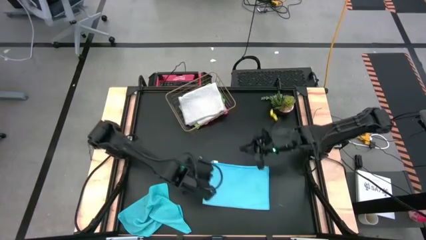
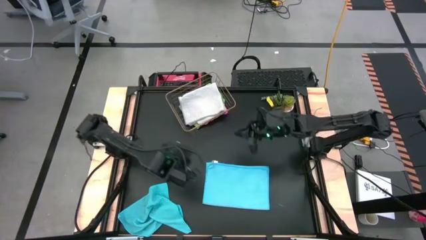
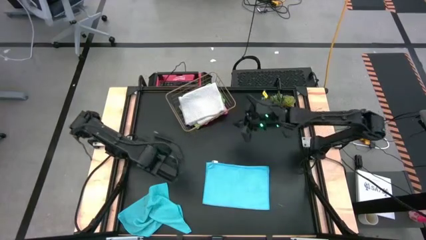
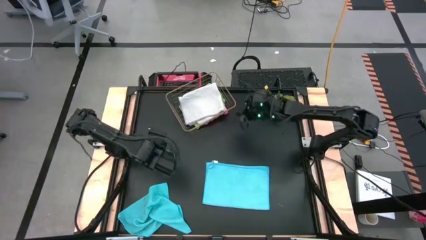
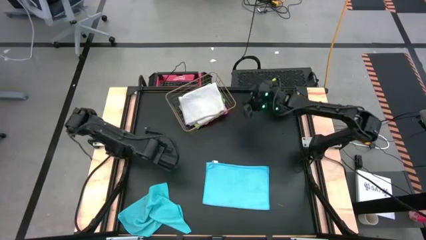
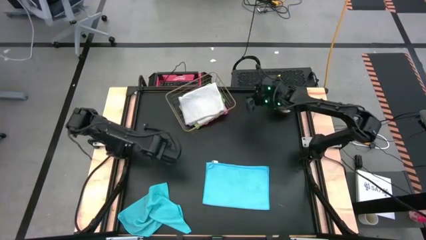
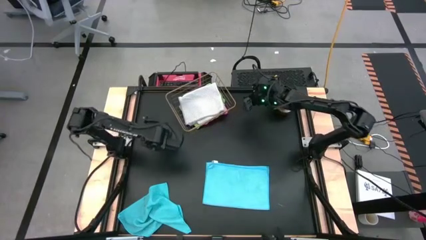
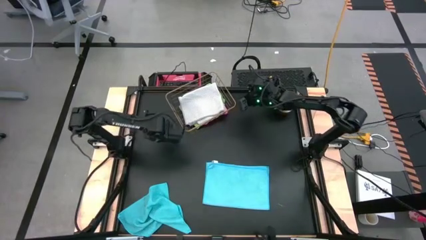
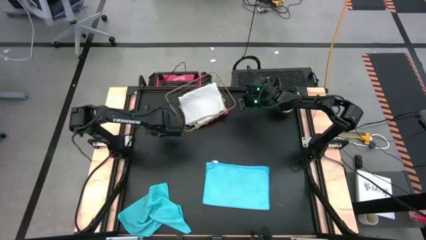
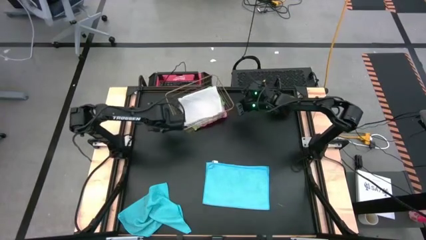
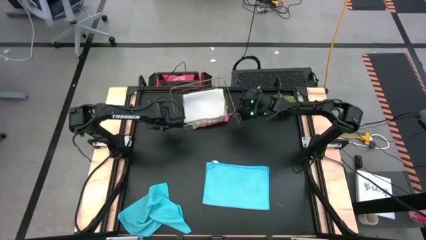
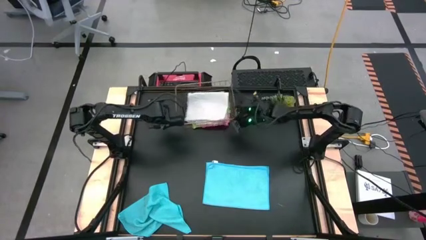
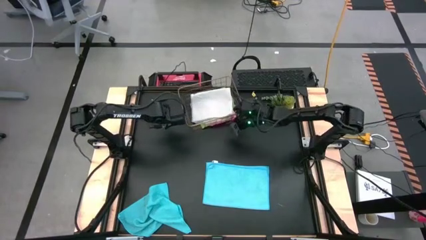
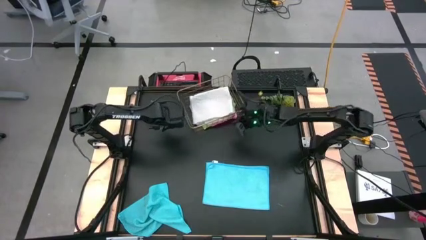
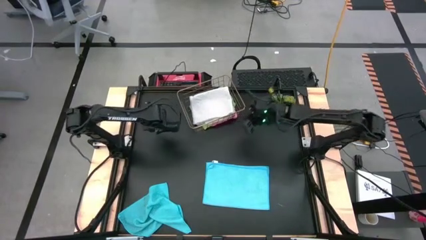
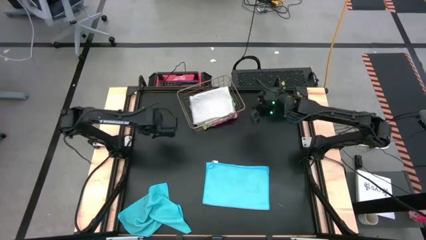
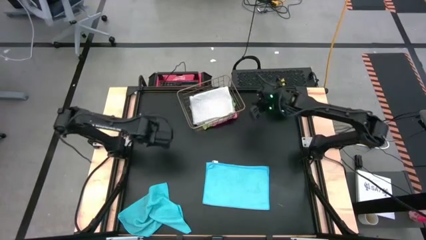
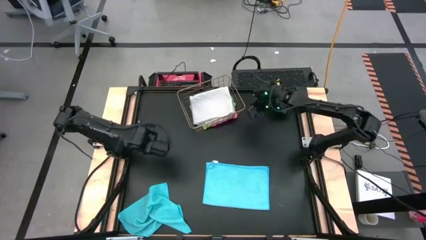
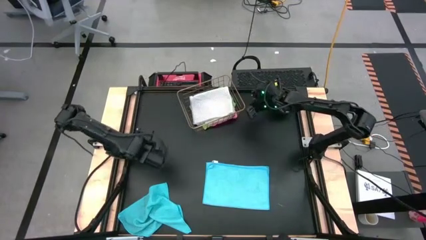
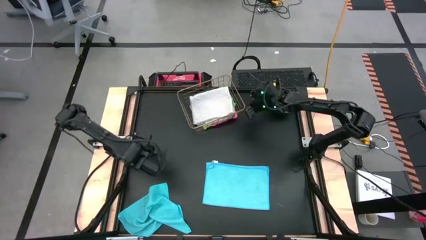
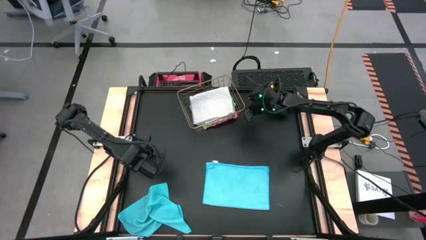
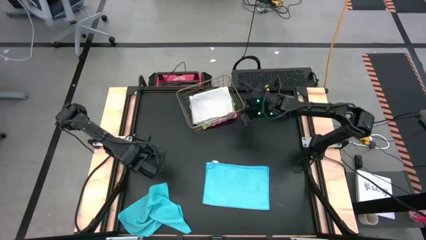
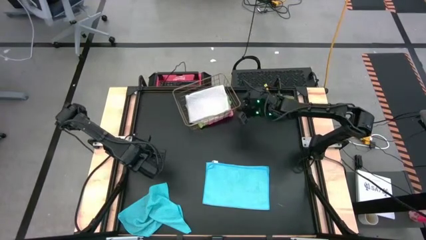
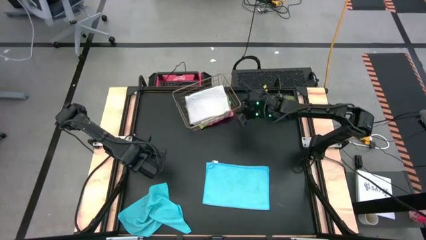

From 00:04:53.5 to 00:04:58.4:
Task: Fold microfiber towels
Adjust the wire basket

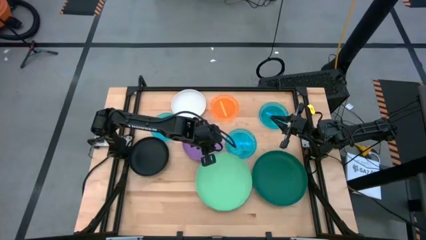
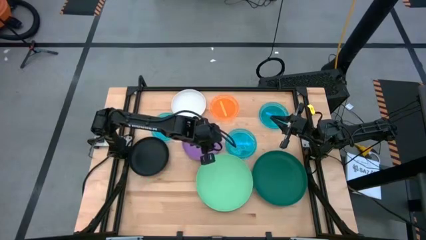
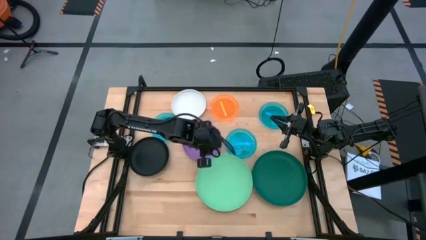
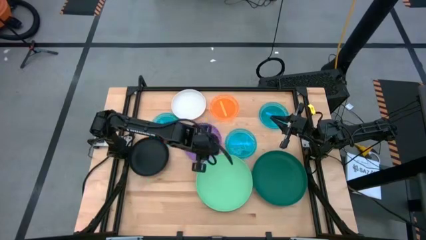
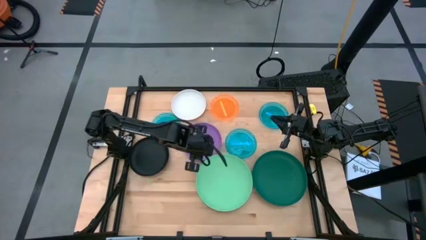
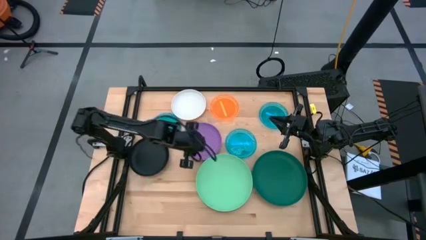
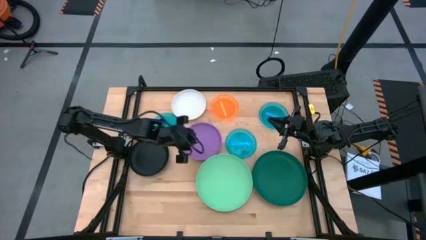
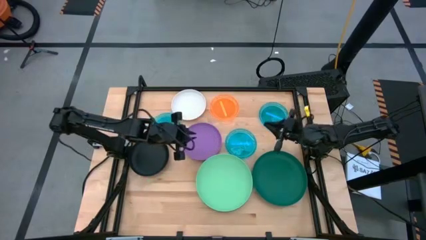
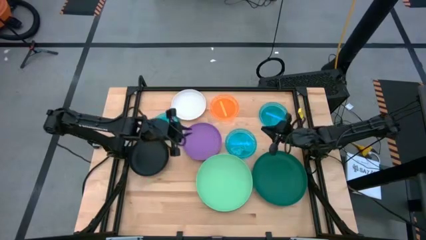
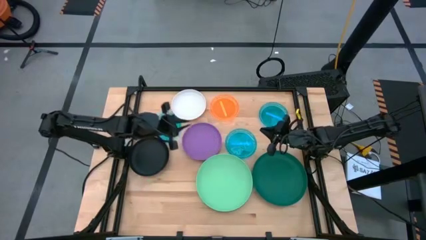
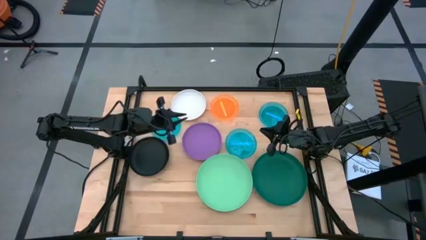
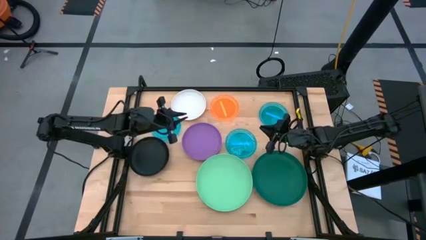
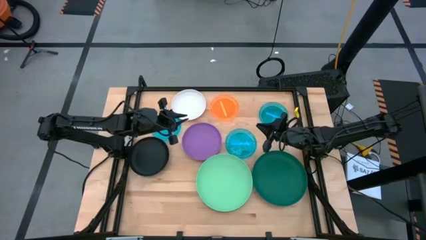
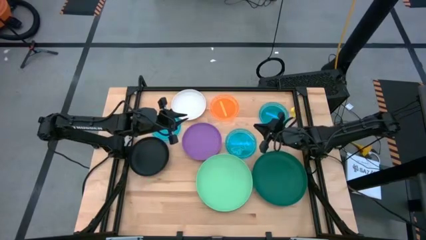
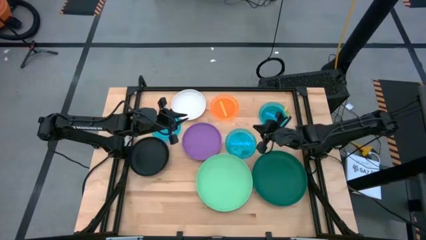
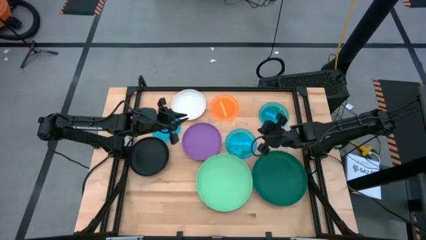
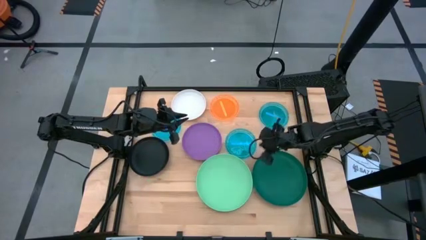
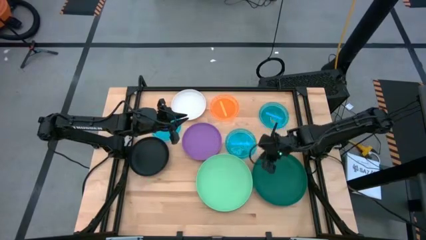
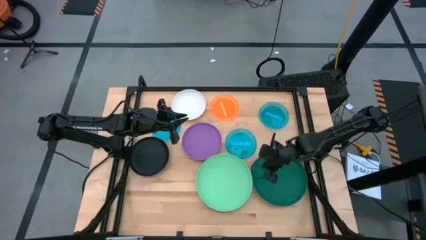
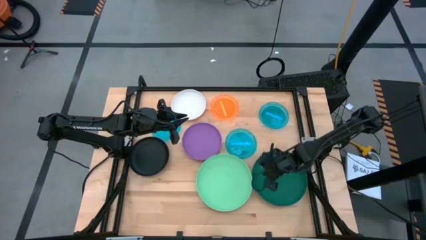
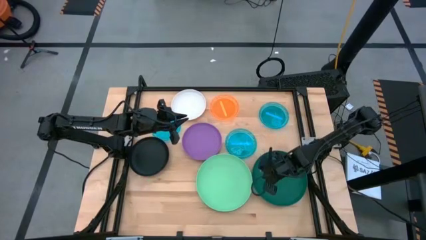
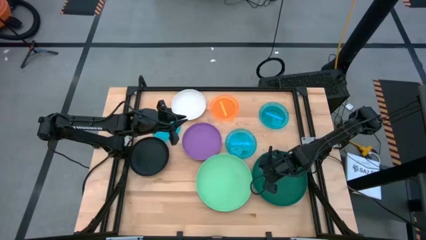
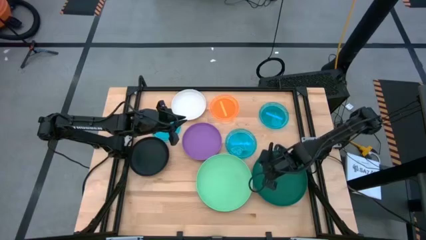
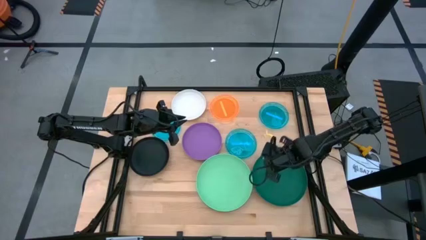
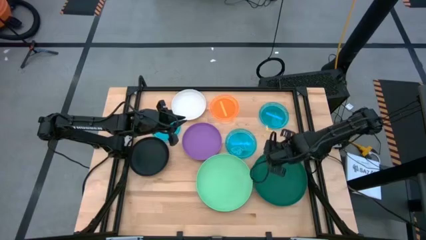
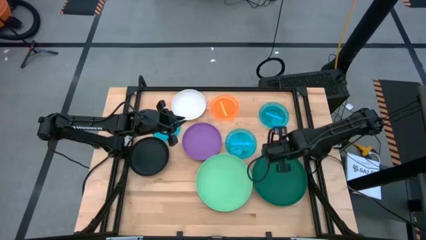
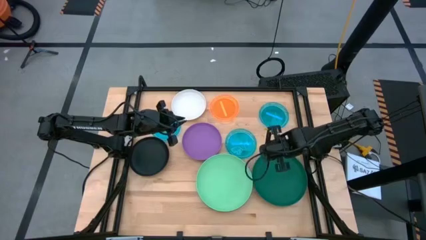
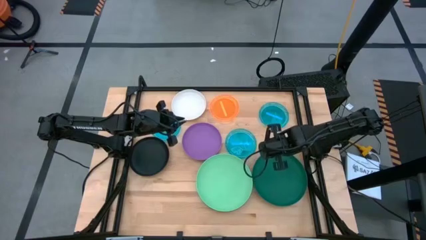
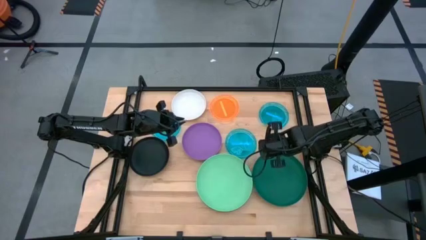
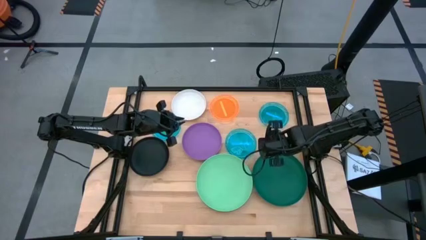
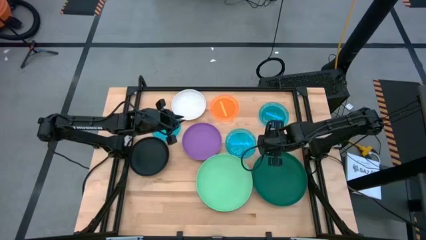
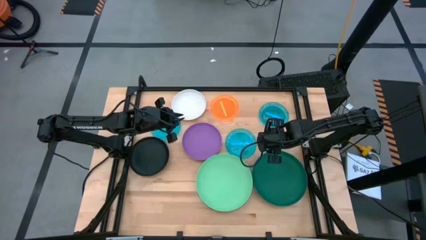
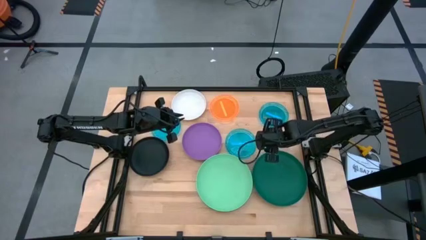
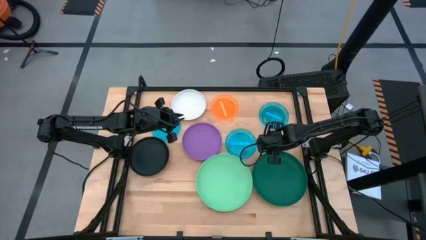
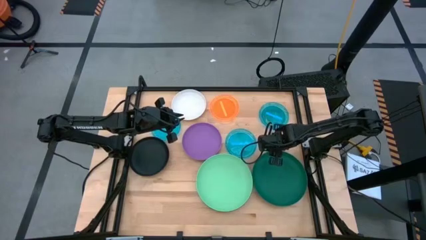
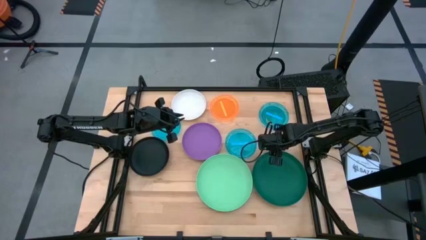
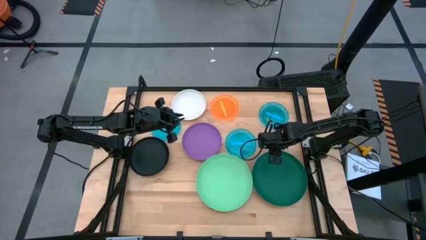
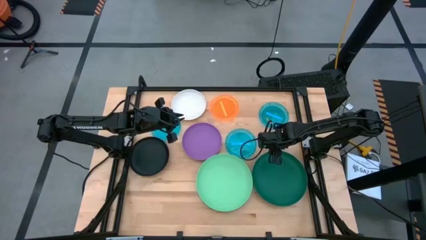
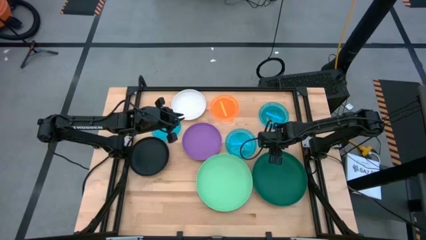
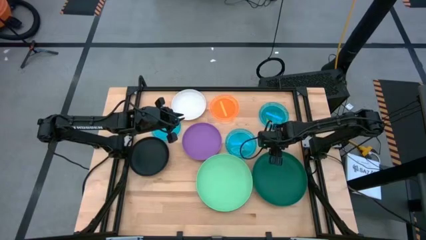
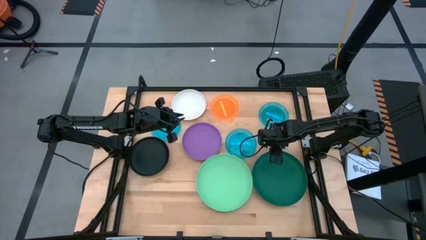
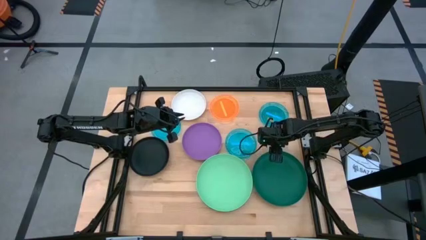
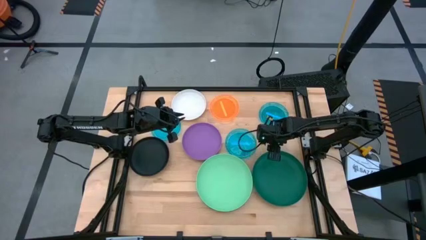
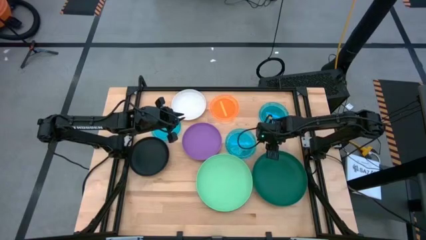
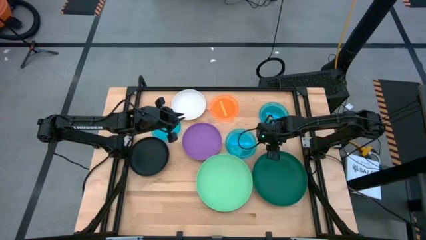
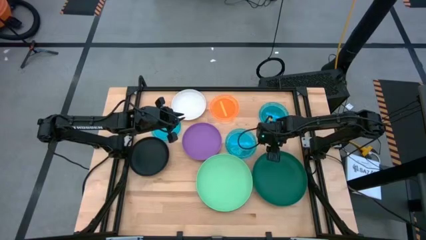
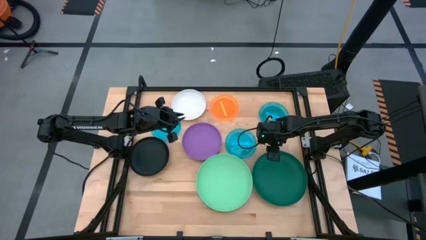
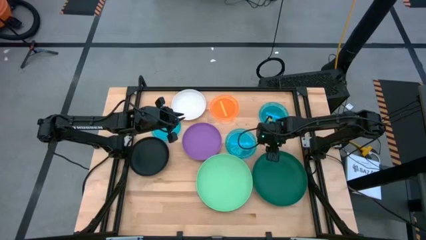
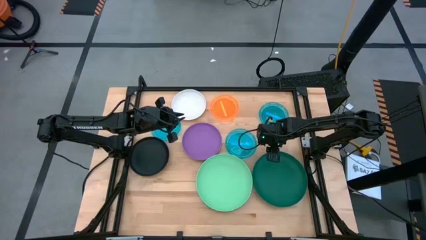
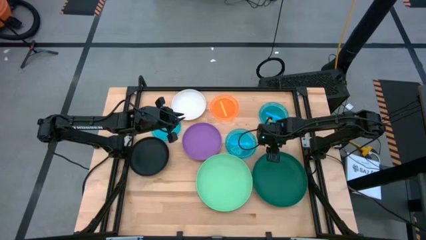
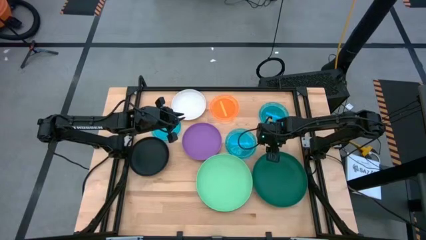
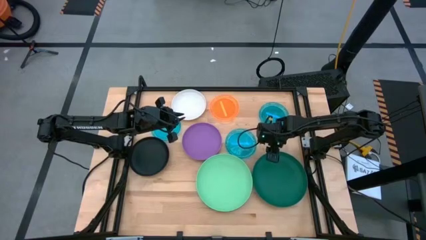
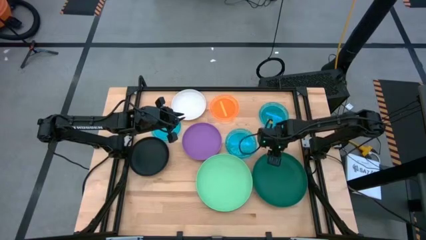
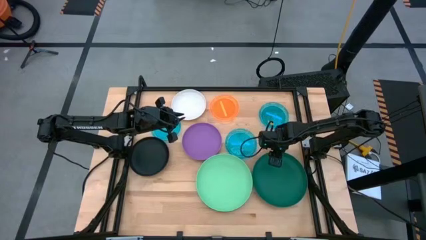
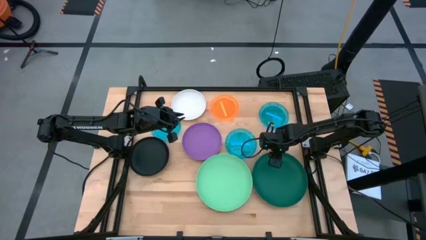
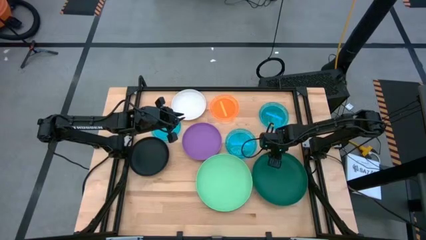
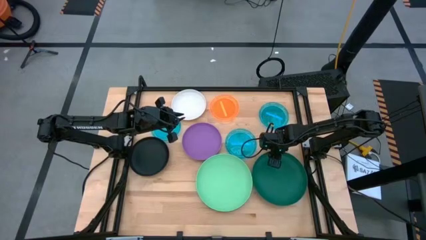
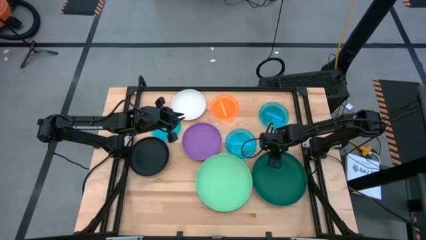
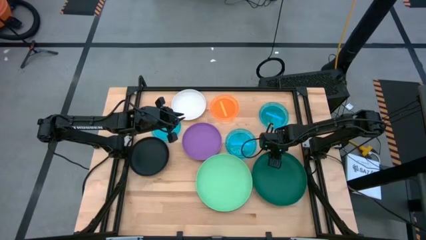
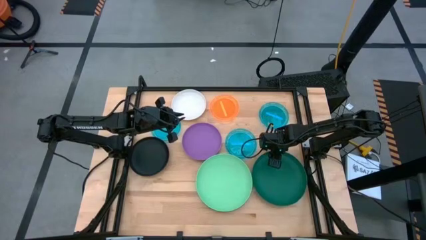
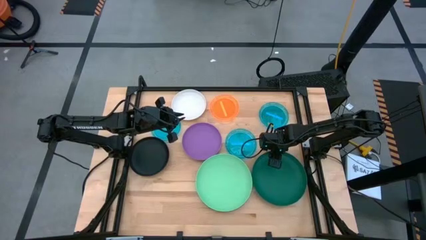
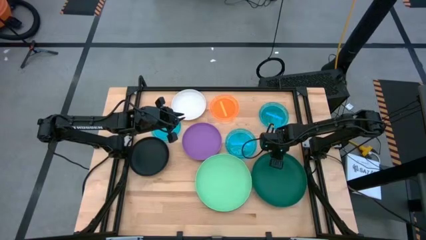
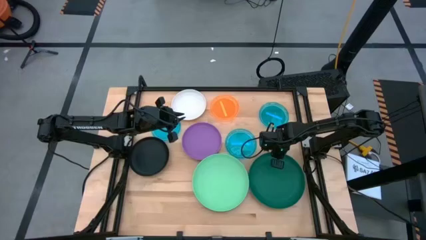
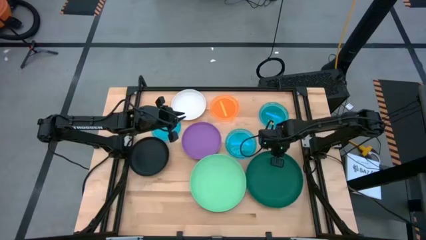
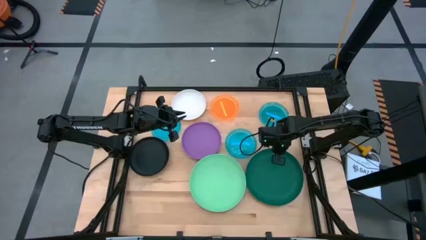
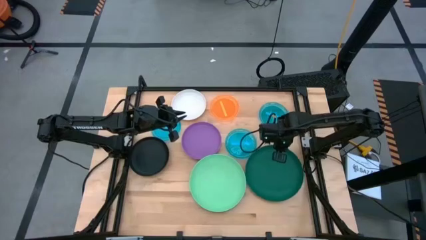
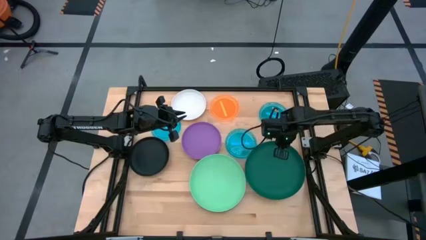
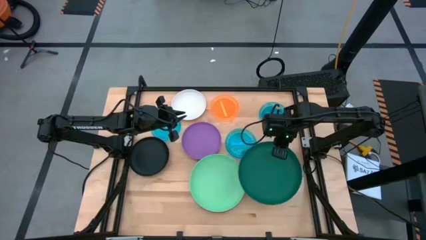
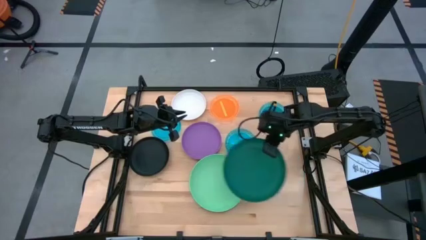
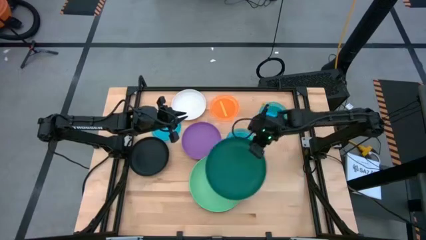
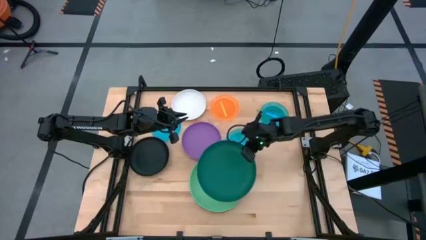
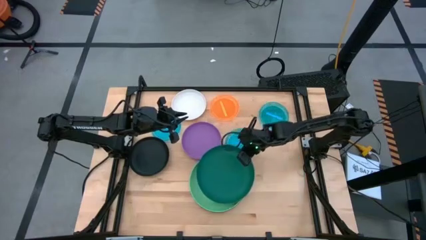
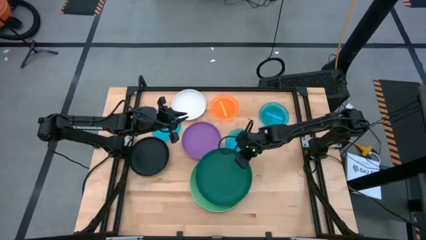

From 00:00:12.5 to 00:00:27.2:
Task: Stack plastic plates
Stack the dark green plate on top of the light green plate
